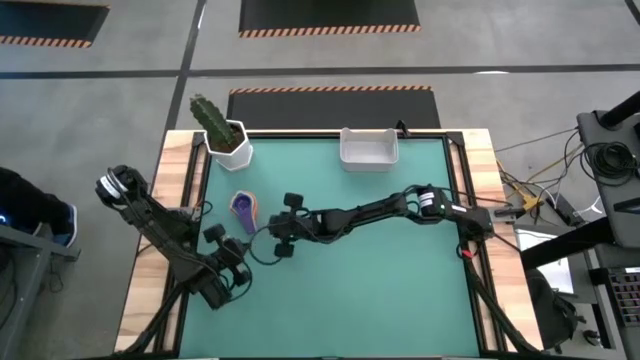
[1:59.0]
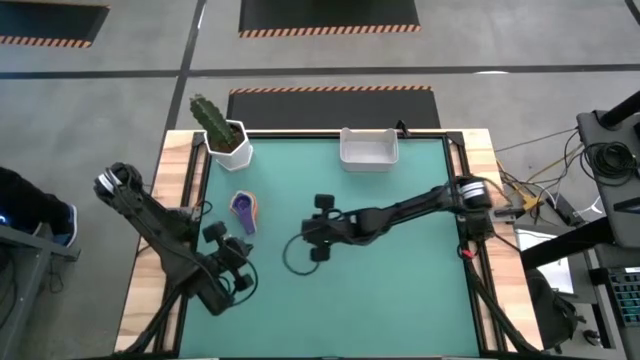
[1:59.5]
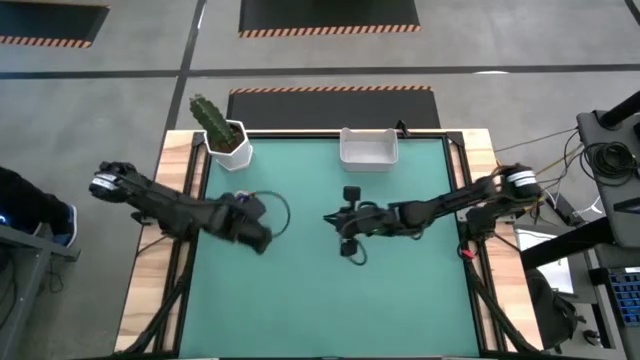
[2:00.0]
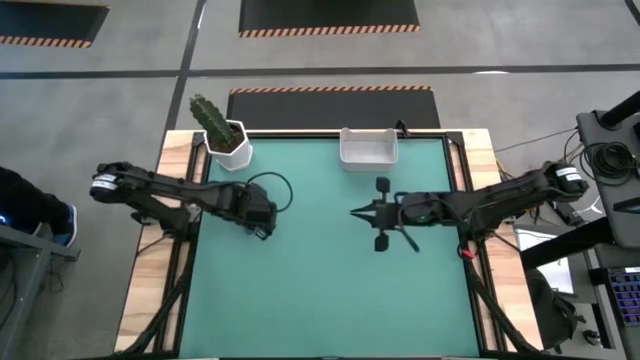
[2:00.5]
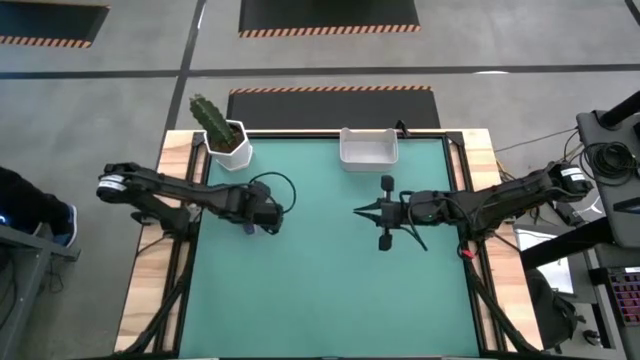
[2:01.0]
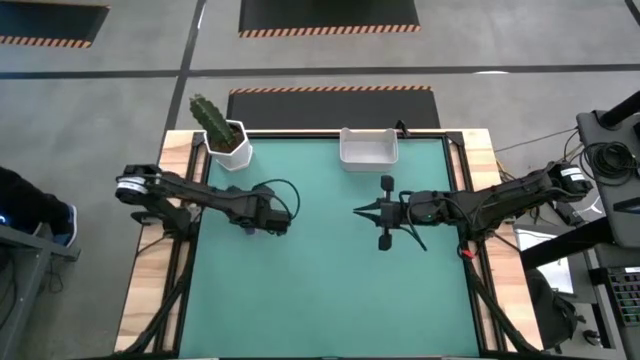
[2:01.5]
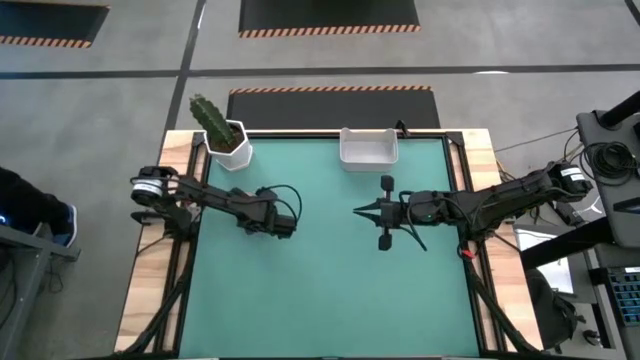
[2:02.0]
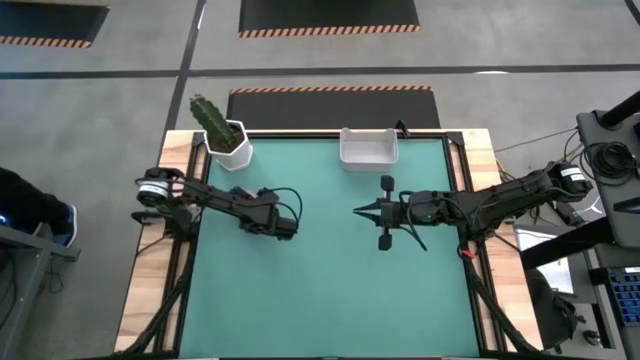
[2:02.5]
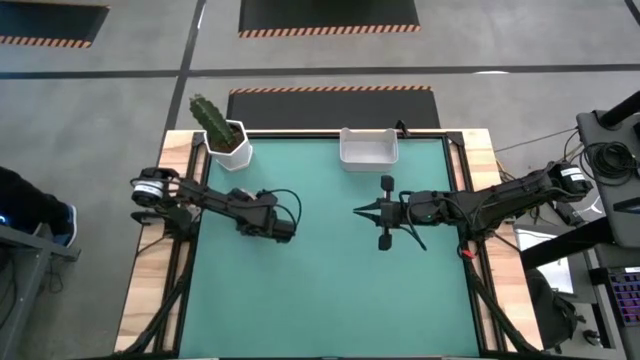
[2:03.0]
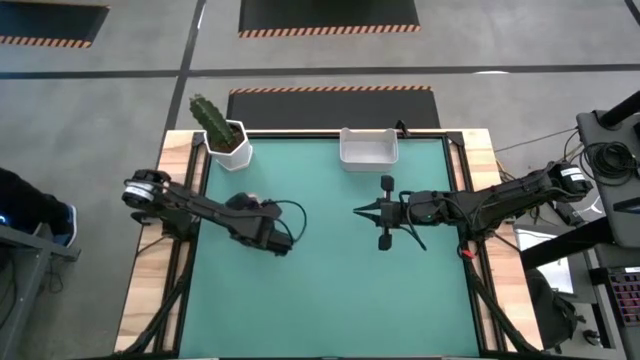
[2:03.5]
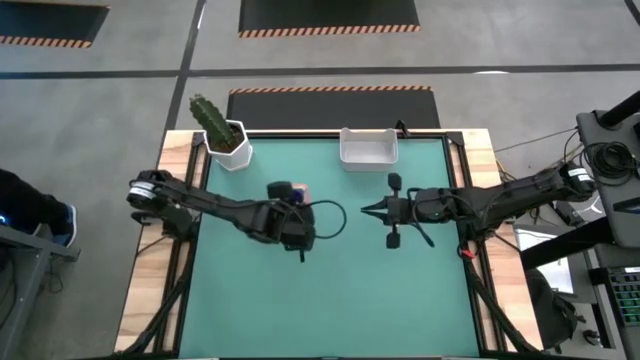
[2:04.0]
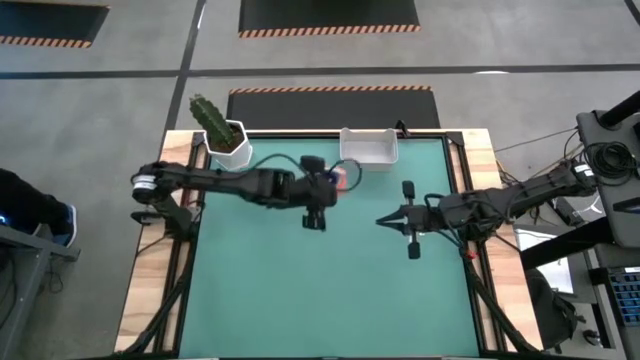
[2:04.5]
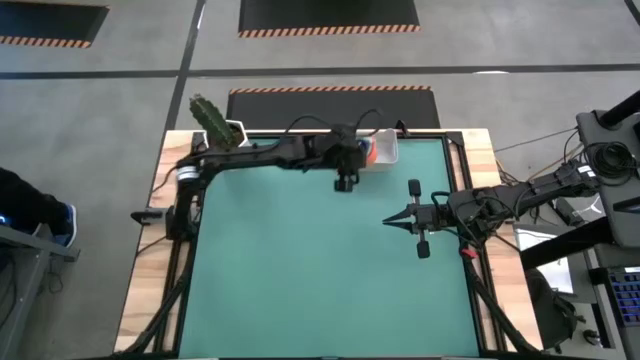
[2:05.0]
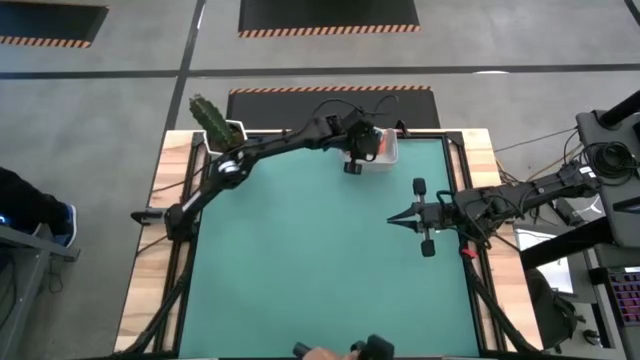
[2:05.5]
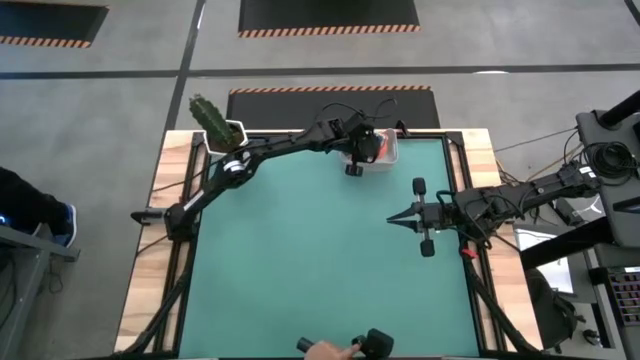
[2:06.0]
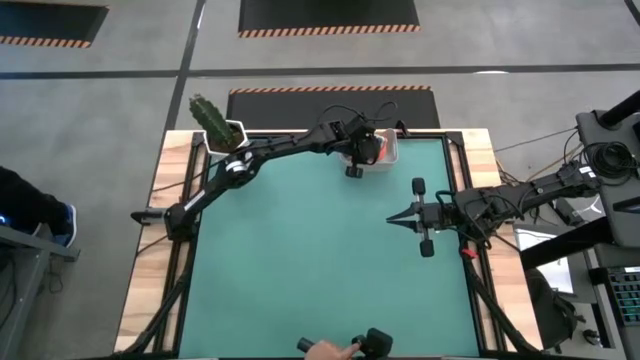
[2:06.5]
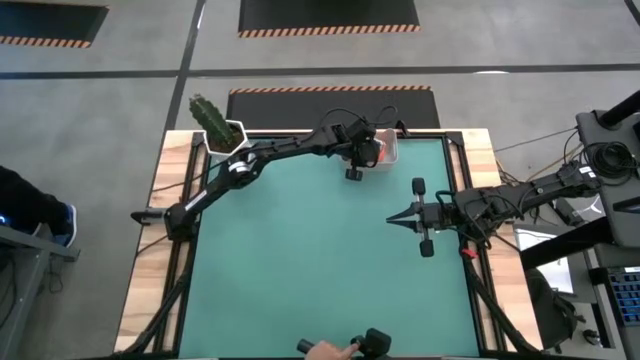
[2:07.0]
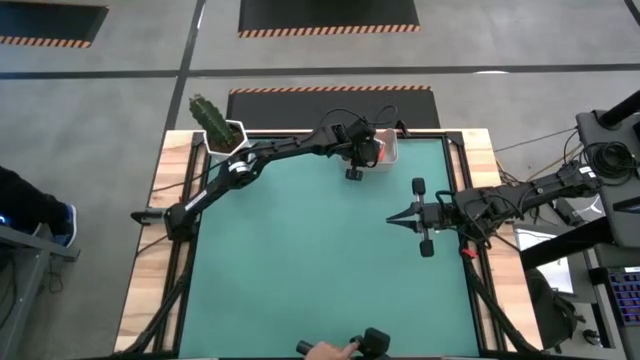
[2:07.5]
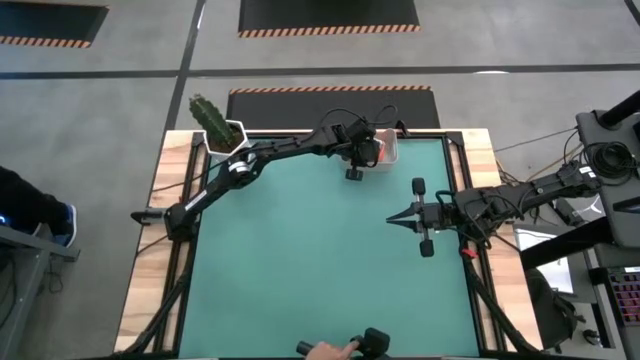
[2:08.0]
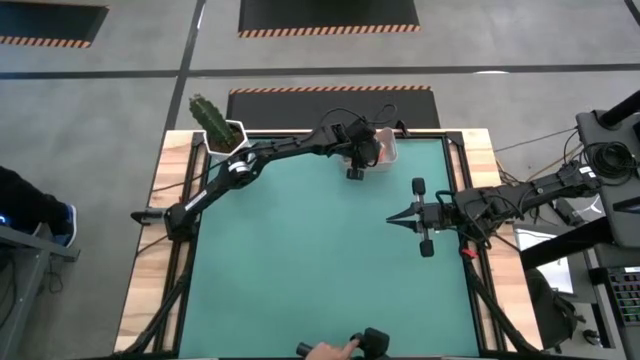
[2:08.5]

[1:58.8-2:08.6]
Task: Nest measuring cups in basket
Put the nested measuring cups into the gray bin

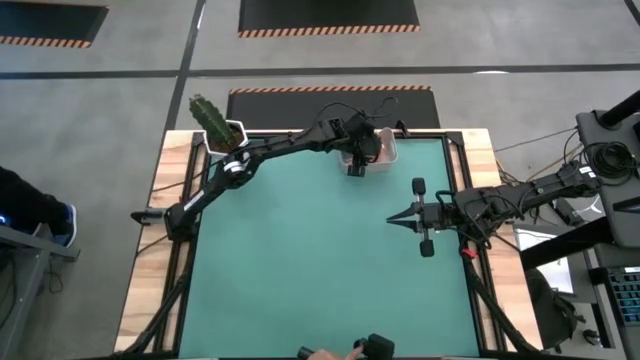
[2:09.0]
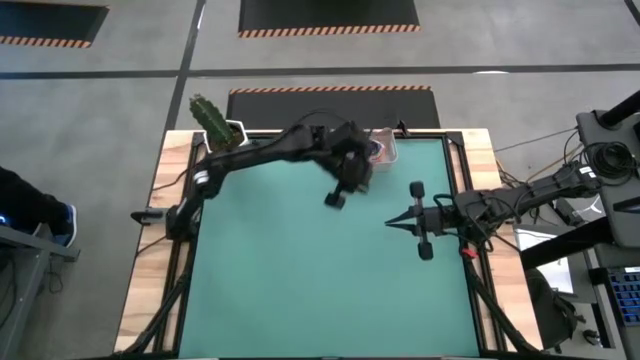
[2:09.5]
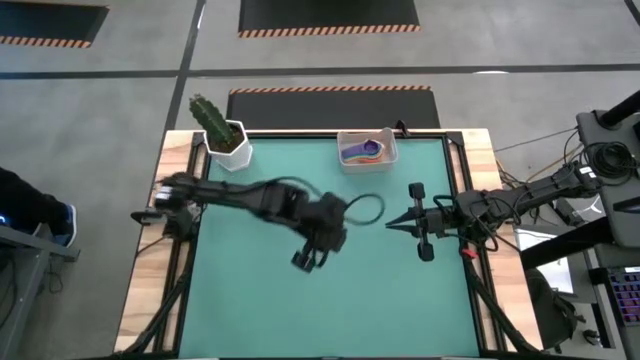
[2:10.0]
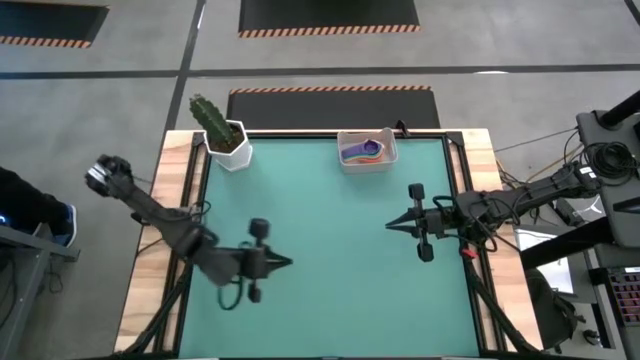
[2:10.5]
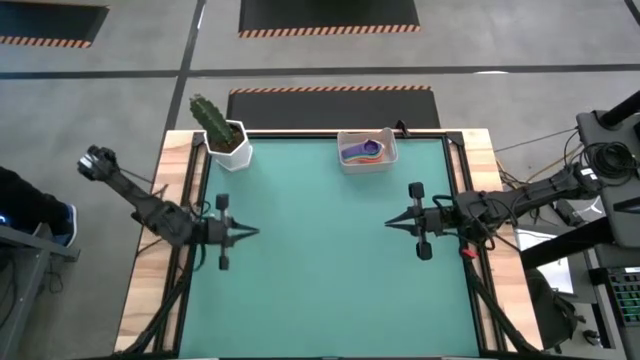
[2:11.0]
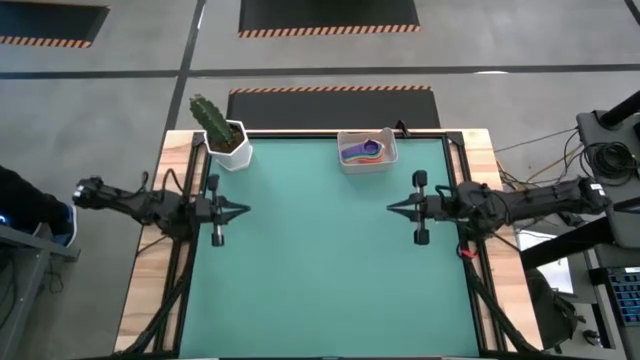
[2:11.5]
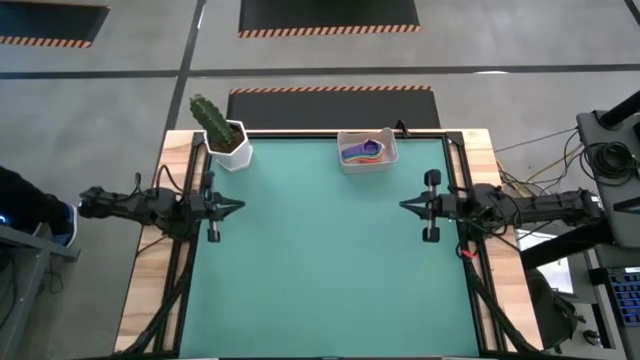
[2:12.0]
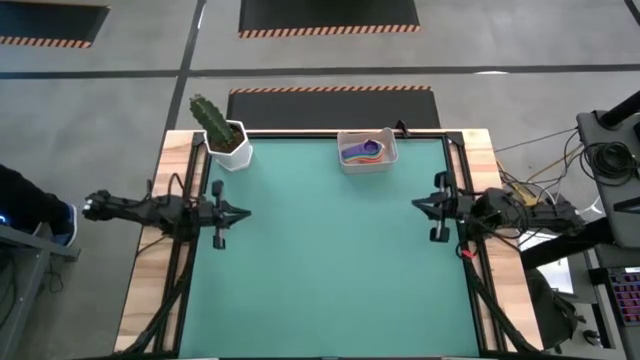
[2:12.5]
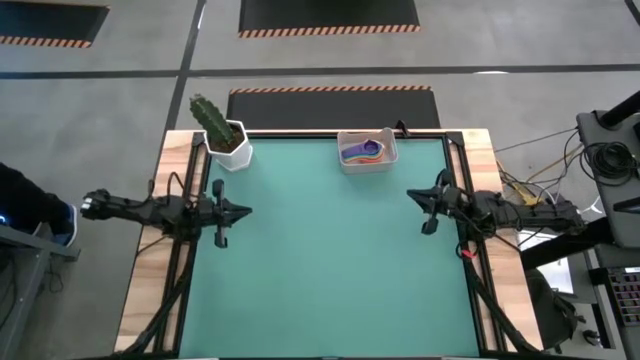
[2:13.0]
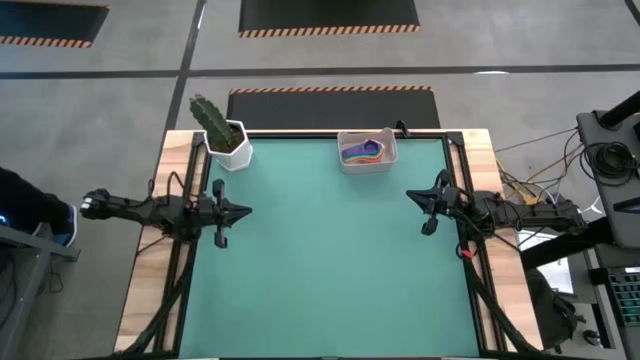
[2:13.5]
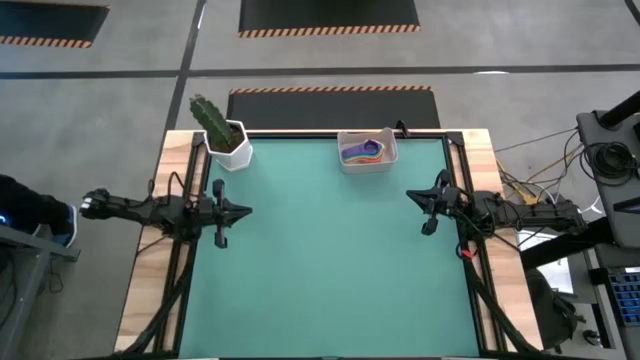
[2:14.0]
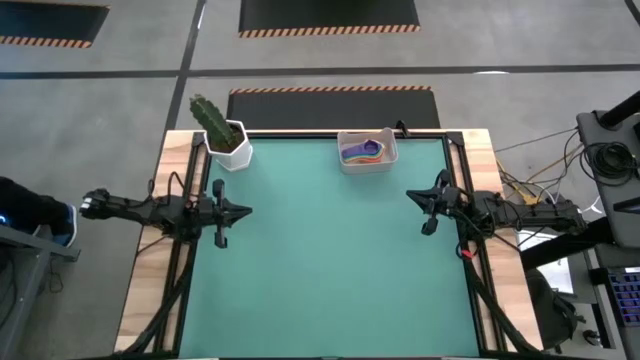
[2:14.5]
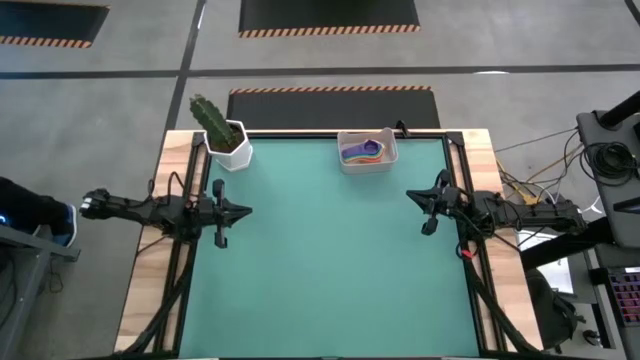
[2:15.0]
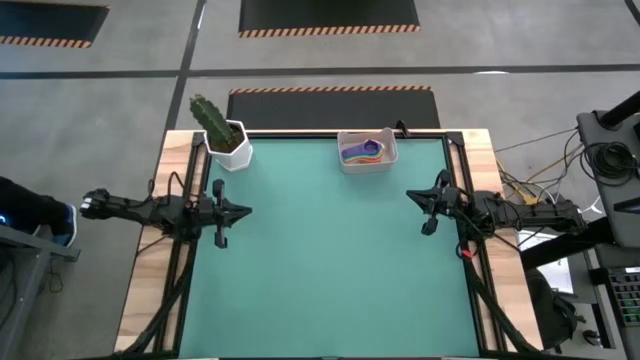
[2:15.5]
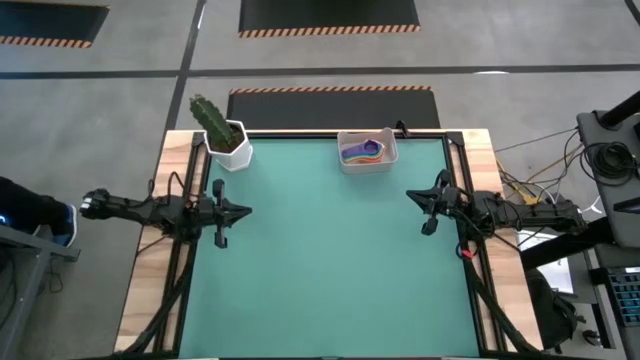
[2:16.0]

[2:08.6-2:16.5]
Return to Home Position

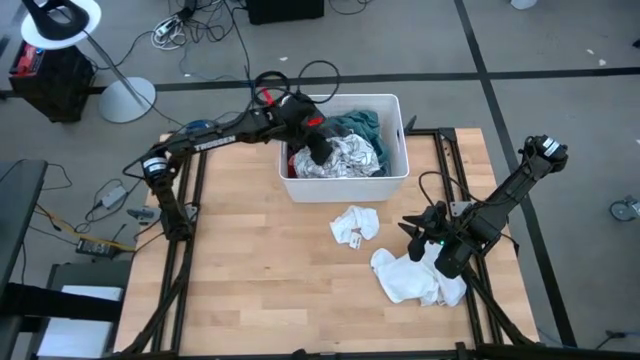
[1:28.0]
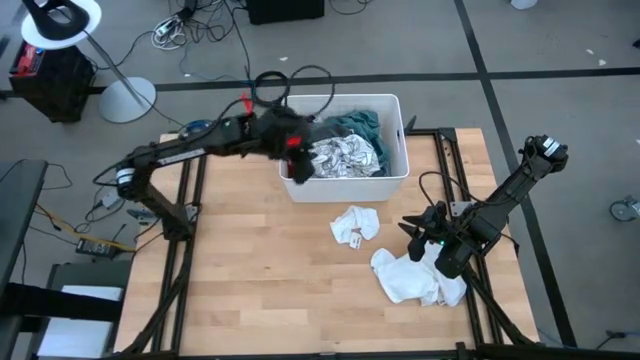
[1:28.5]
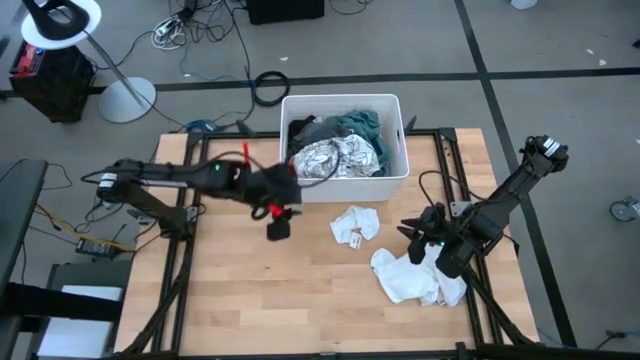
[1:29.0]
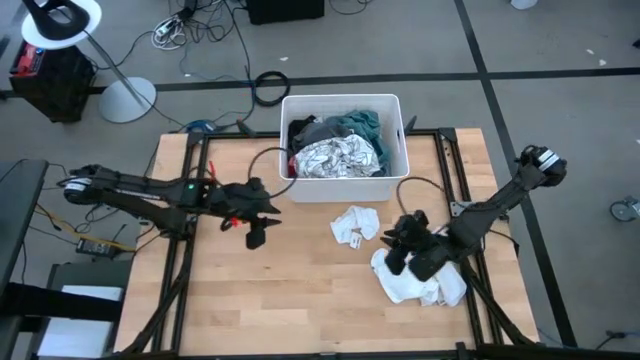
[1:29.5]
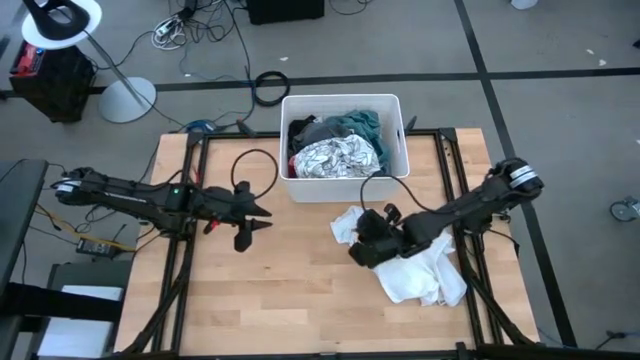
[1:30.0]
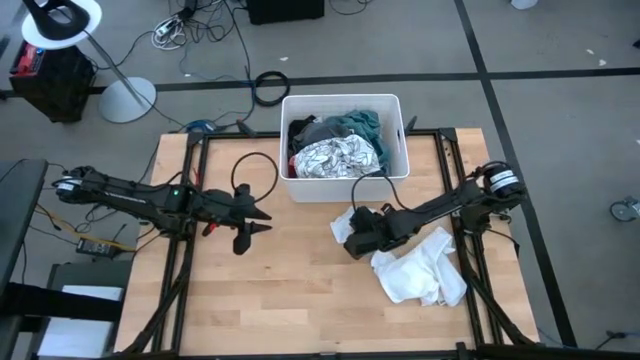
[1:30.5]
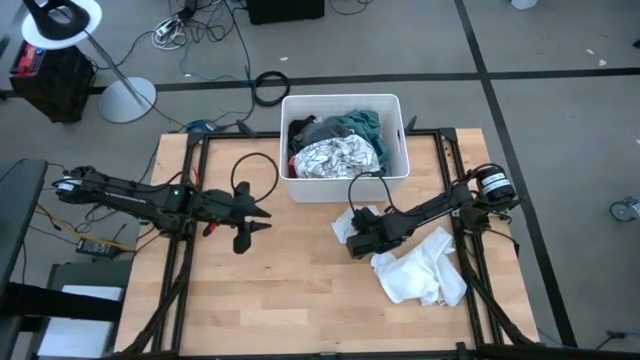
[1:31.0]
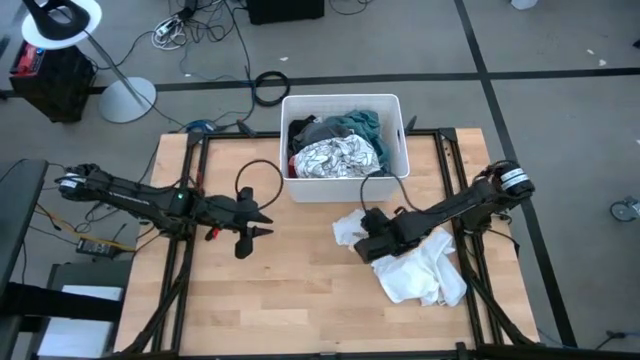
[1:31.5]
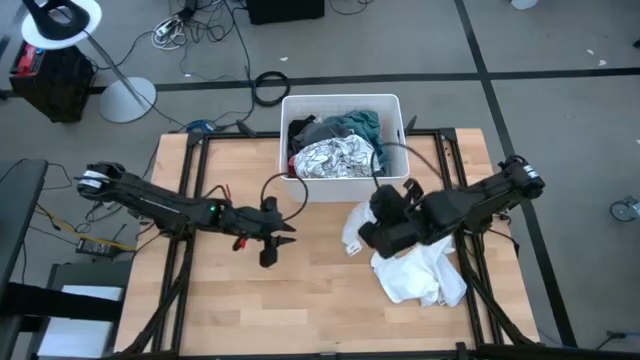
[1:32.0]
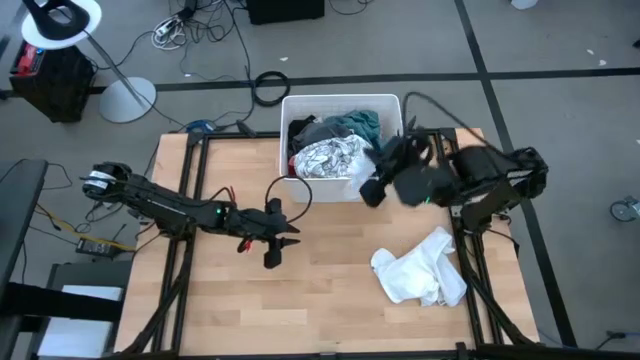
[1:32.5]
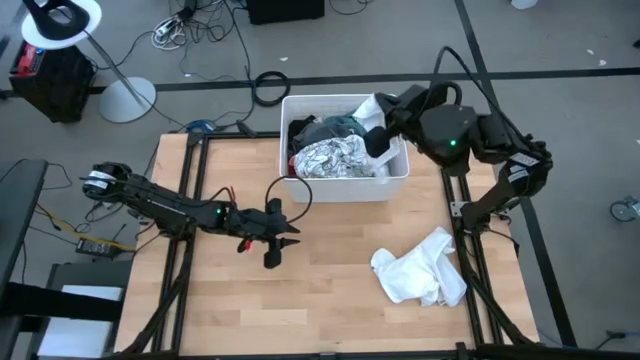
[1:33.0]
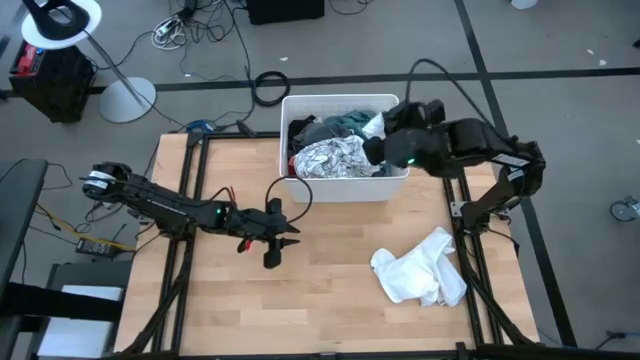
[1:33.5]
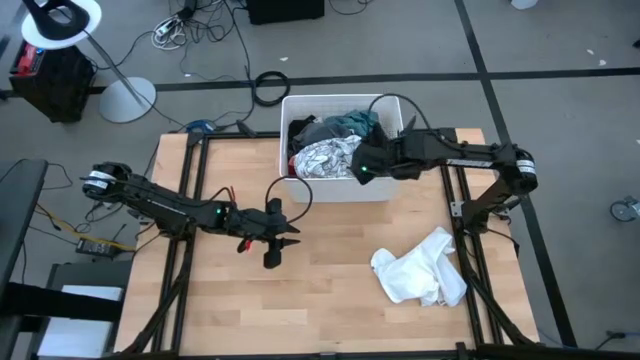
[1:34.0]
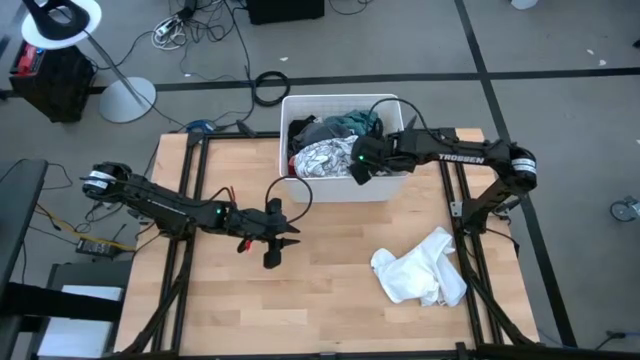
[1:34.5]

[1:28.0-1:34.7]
Task: Sort clothes
Put the top white sock into the white laundry bin
